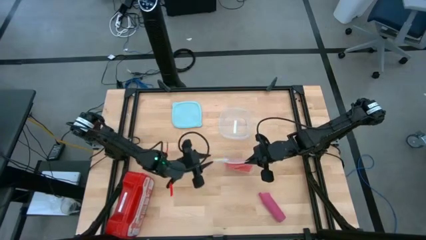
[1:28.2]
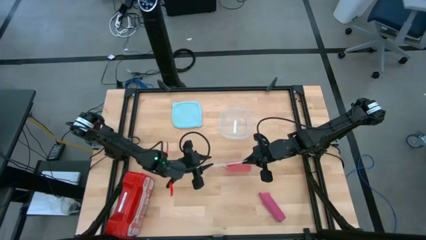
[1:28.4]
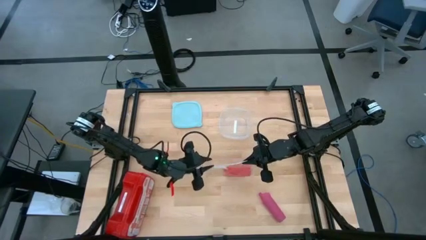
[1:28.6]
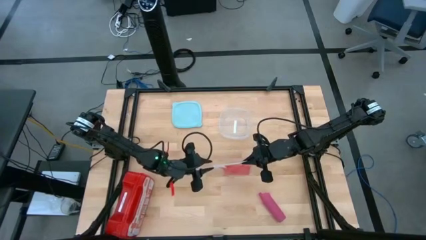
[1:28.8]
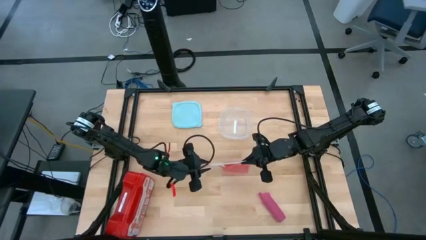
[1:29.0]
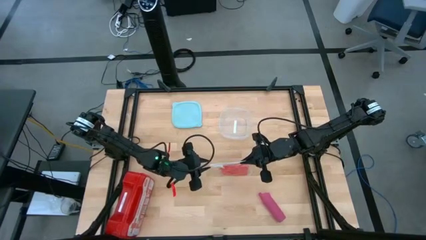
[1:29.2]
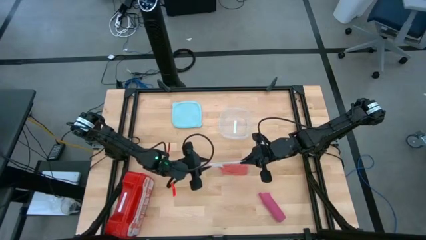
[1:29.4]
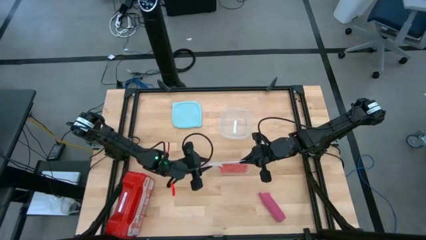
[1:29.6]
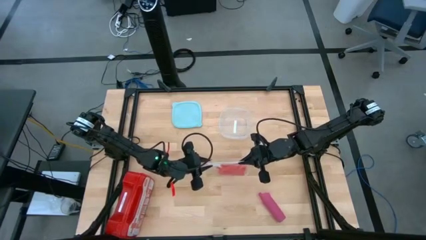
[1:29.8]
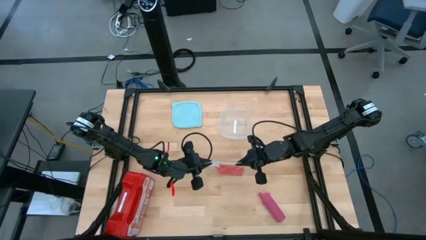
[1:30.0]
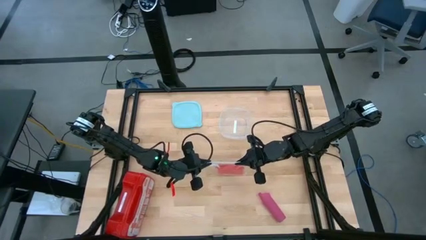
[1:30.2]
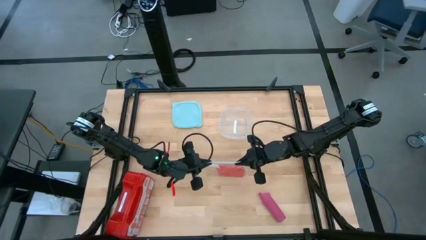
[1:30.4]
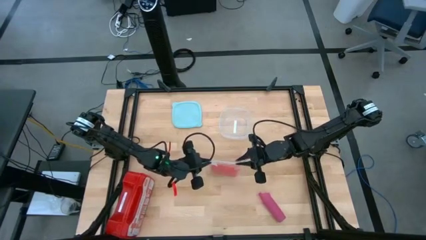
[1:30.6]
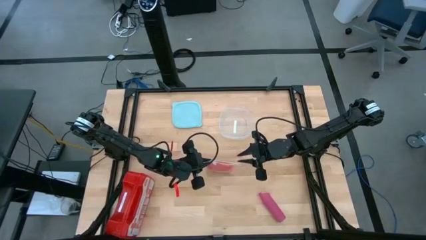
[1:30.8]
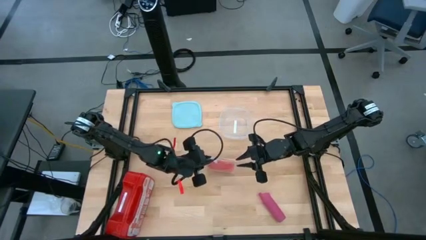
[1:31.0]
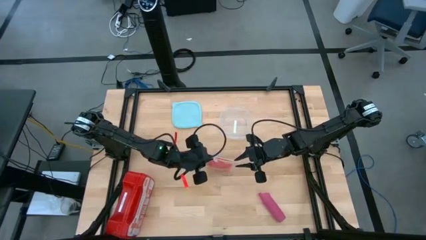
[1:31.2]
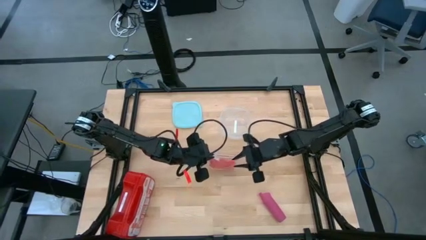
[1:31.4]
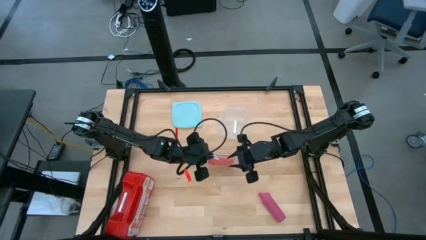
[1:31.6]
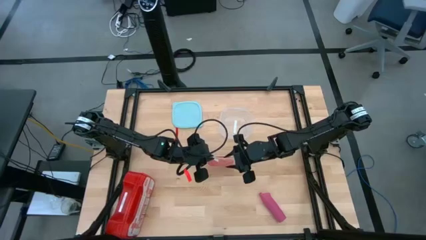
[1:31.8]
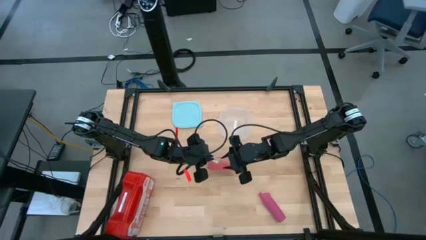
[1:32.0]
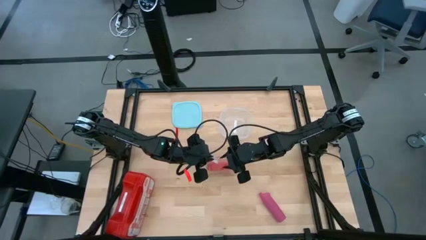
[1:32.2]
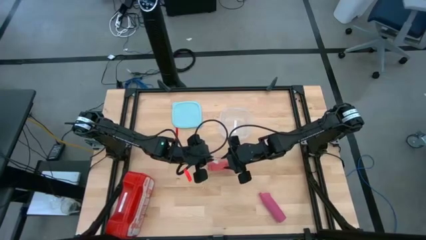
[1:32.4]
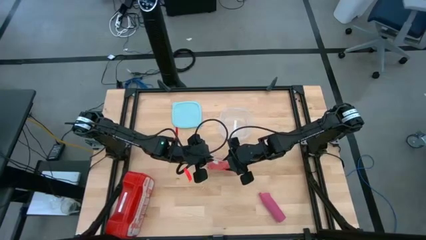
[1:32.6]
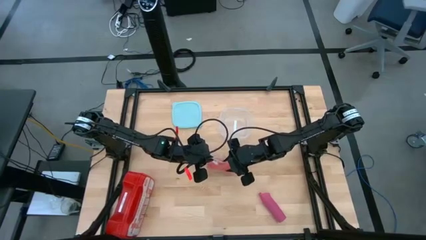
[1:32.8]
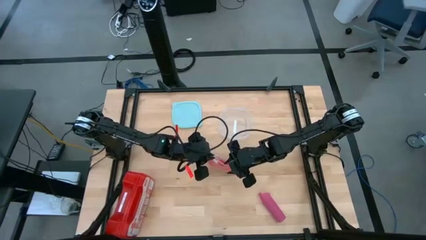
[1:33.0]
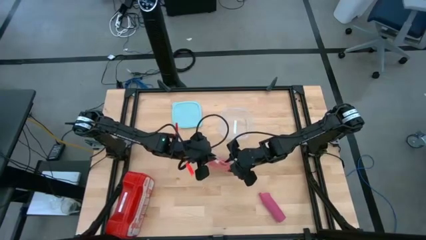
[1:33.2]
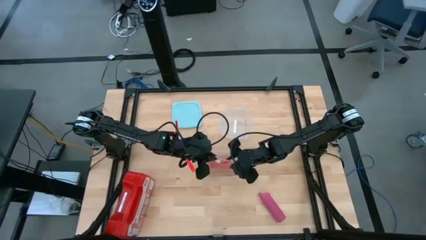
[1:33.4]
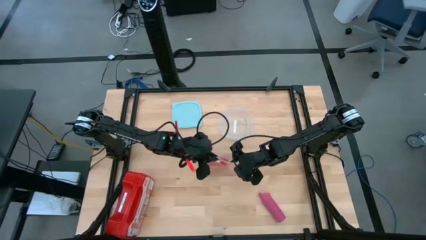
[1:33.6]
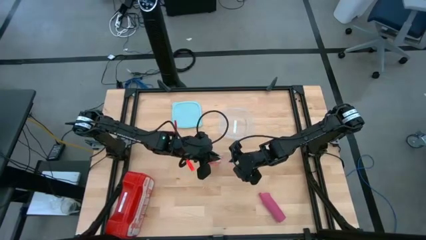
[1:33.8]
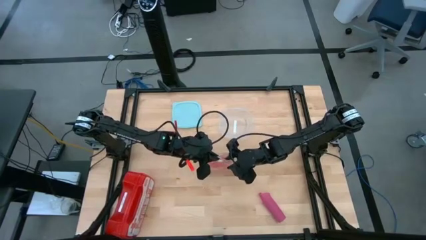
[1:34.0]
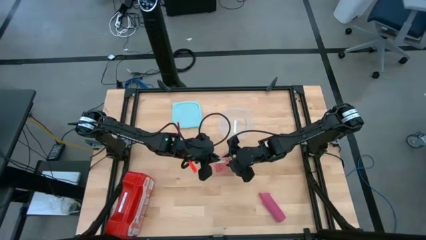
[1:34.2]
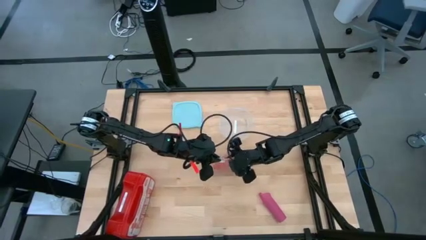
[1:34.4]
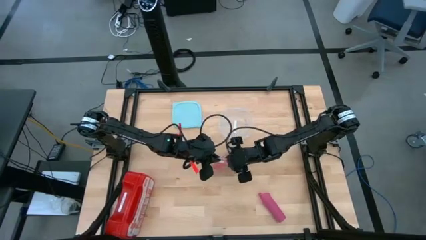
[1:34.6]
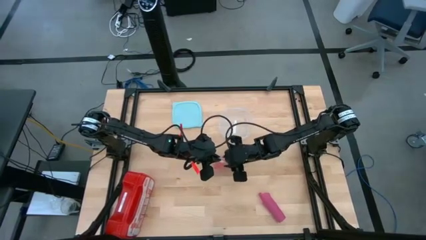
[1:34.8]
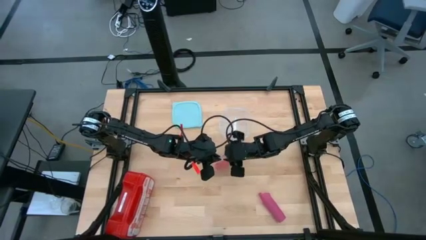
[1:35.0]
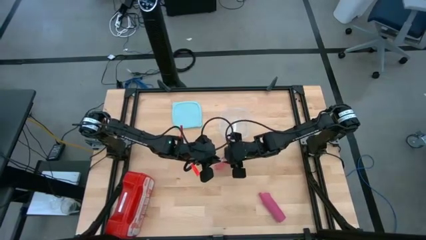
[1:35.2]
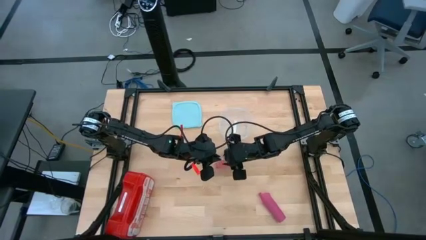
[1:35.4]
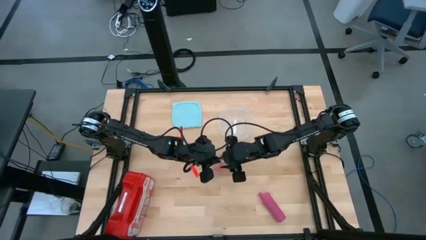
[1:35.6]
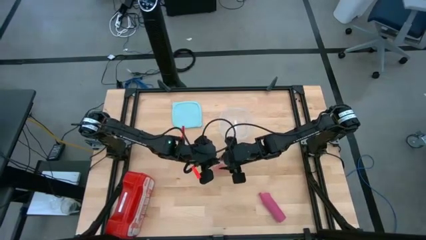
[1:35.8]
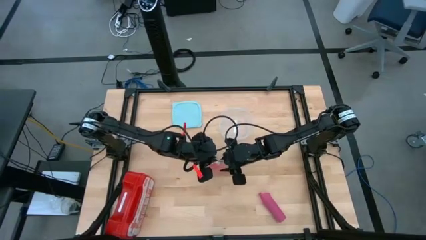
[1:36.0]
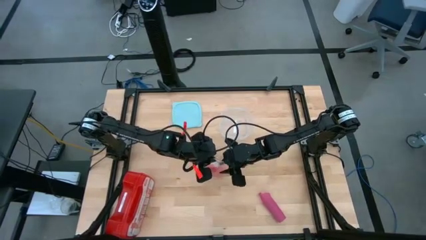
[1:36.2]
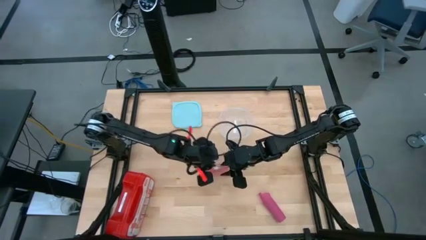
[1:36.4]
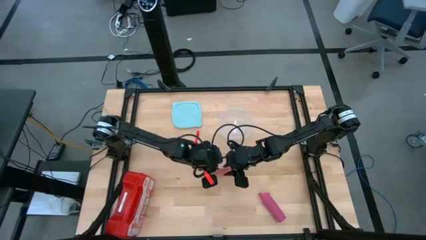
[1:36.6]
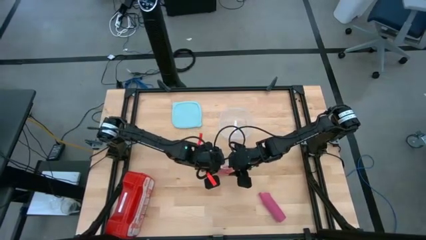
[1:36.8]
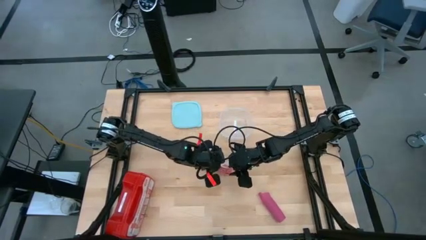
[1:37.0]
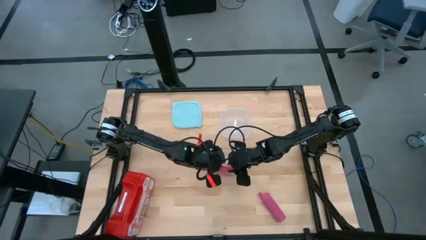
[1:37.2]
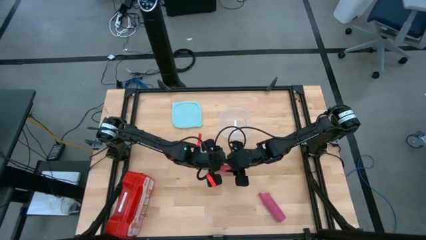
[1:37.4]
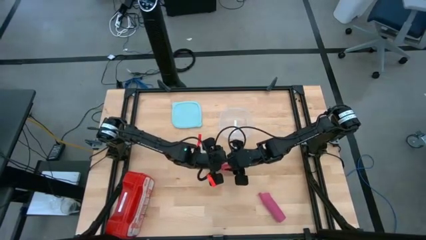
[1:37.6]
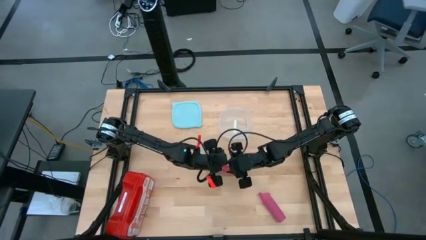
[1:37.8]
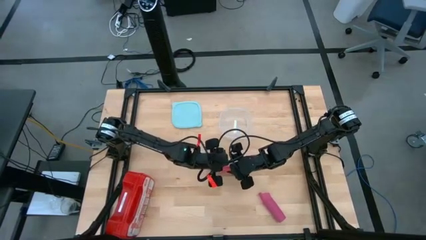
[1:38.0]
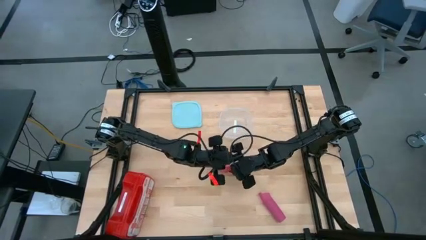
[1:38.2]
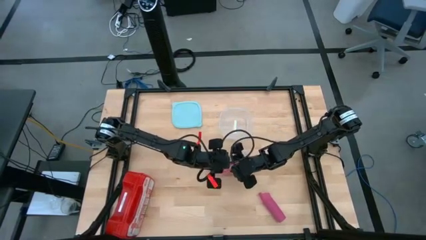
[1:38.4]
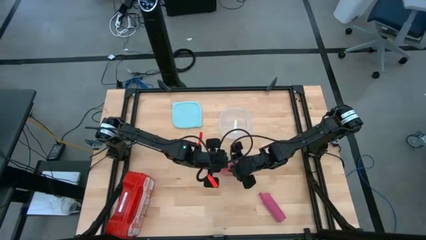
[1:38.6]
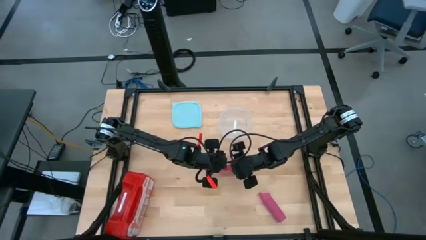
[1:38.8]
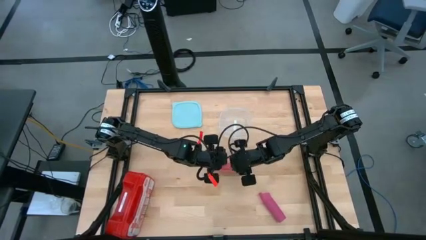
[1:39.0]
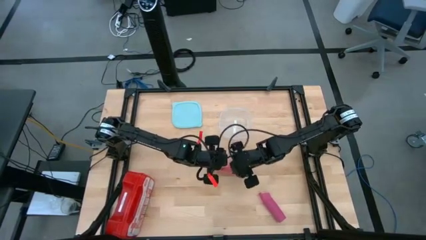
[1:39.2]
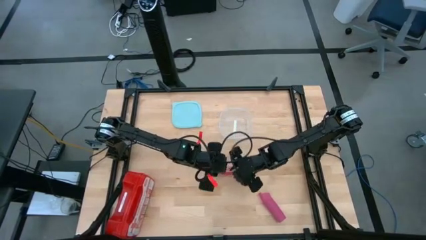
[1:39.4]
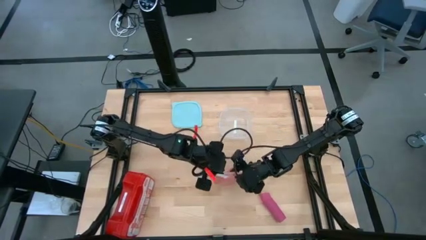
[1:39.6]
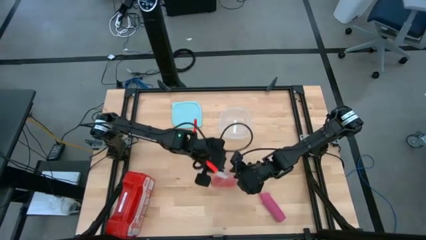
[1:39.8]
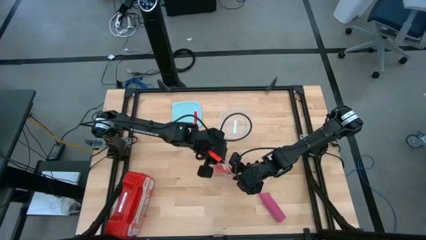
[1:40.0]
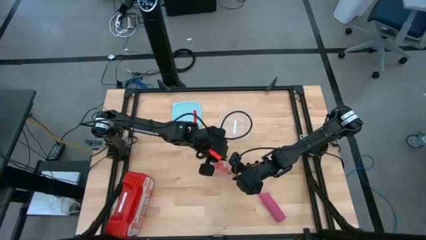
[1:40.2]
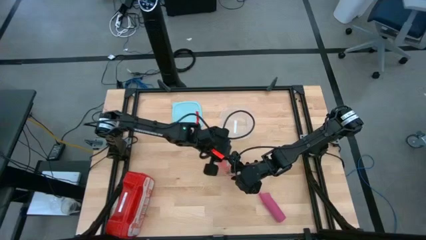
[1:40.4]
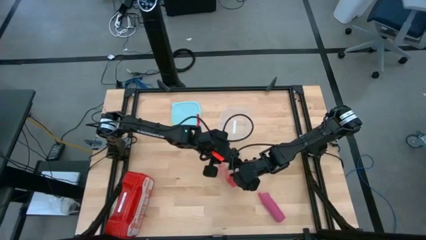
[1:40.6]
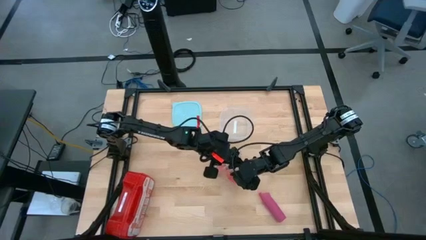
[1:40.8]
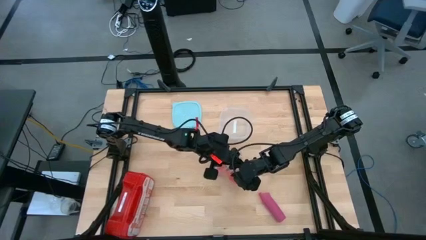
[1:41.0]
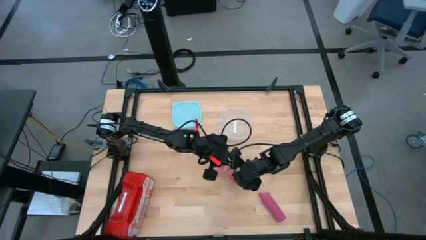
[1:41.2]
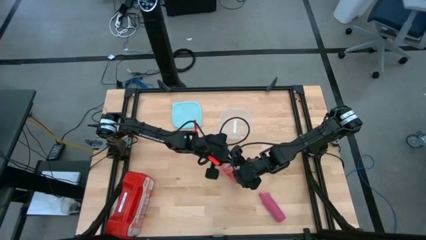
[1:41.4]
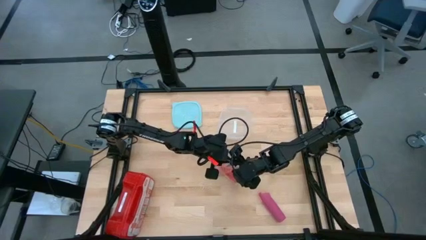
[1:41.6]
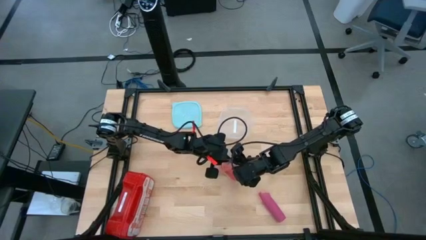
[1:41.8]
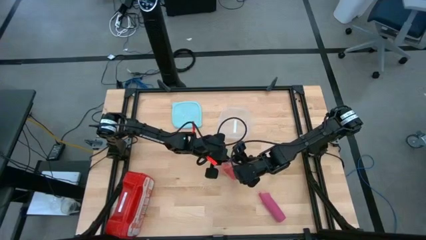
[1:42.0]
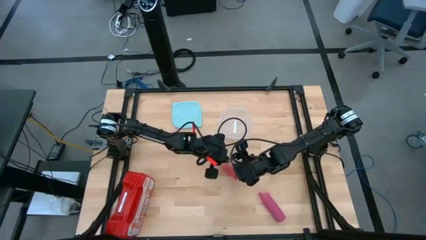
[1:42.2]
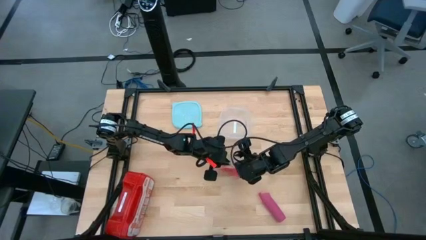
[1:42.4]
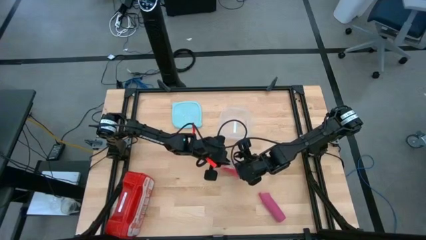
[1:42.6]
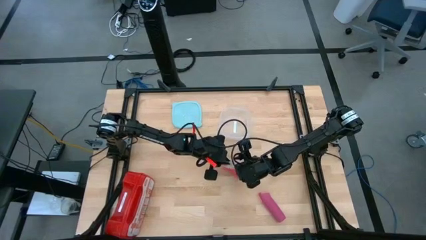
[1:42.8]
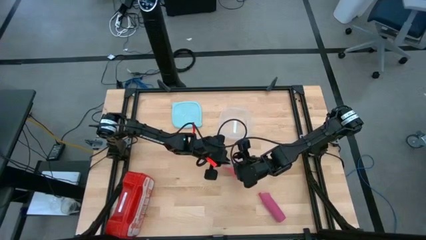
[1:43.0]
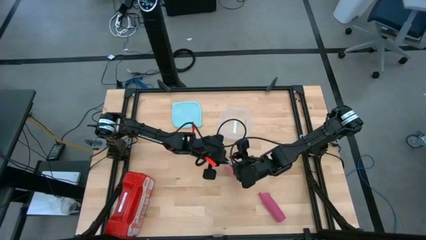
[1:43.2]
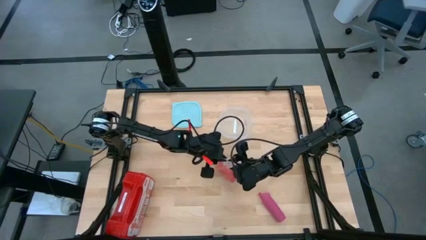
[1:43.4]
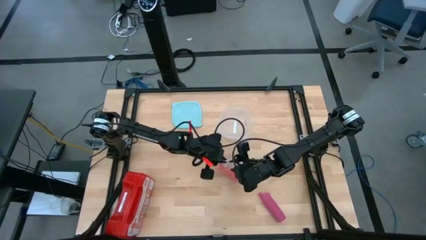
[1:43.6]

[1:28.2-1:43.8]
Task: Roll bandage
Open the transparent zip bag
